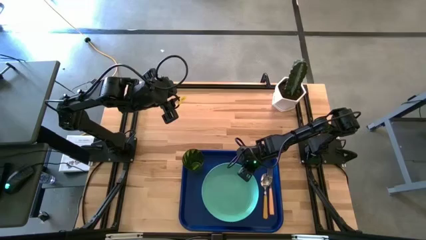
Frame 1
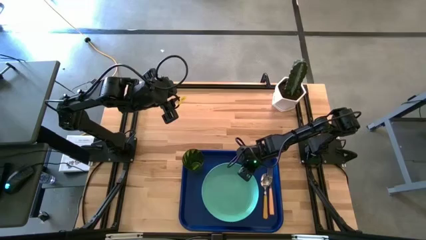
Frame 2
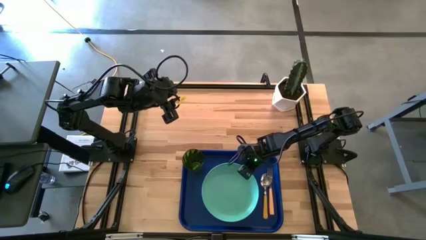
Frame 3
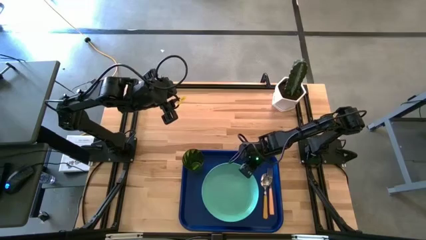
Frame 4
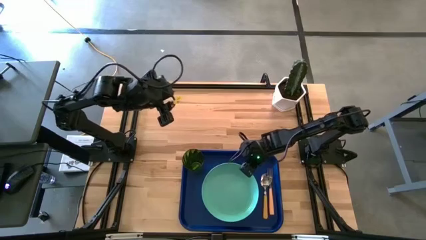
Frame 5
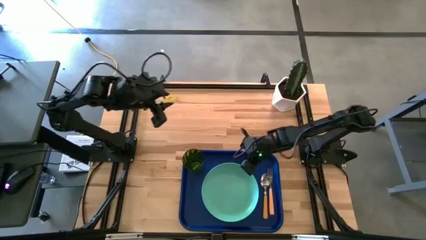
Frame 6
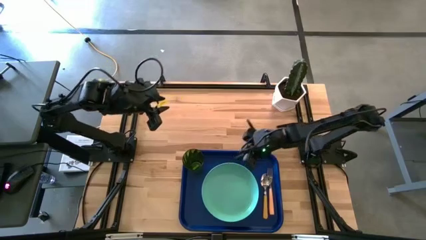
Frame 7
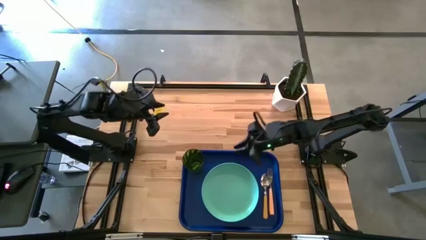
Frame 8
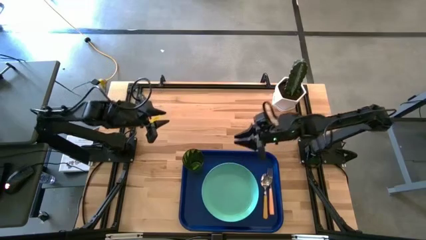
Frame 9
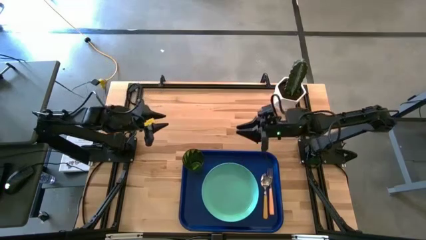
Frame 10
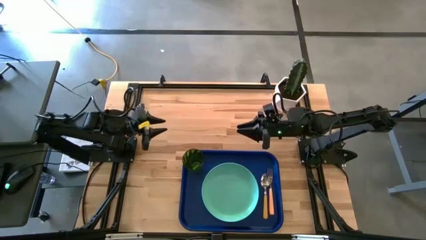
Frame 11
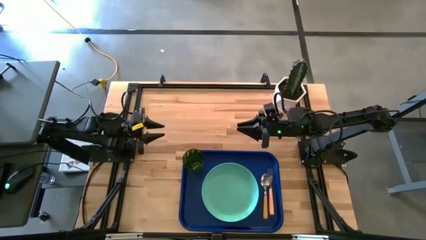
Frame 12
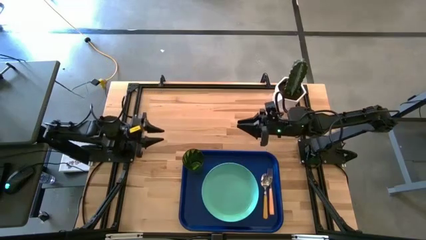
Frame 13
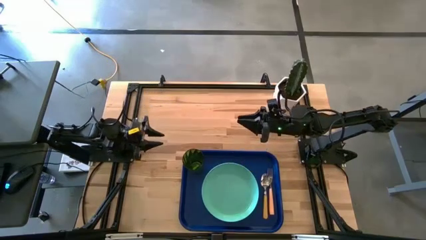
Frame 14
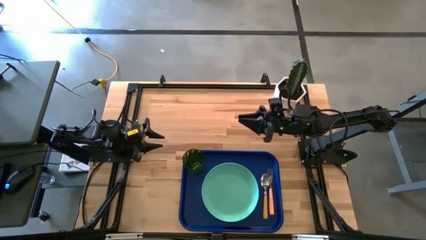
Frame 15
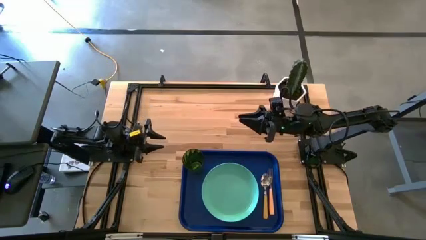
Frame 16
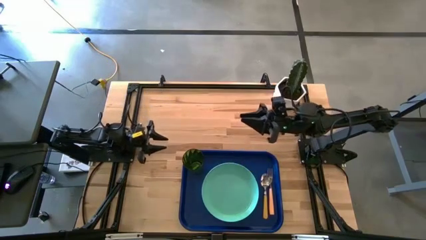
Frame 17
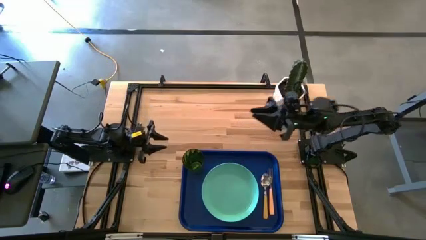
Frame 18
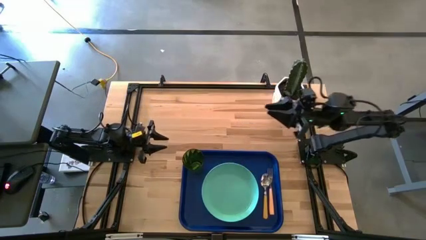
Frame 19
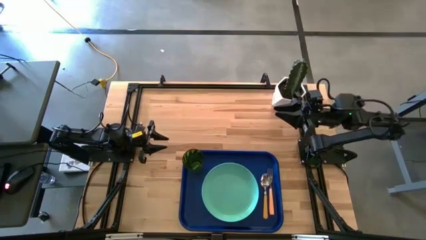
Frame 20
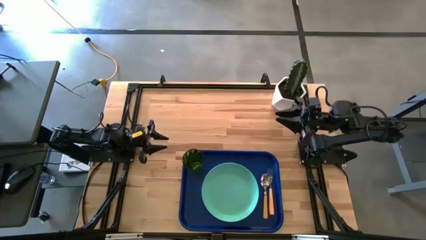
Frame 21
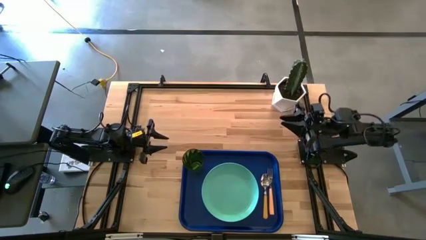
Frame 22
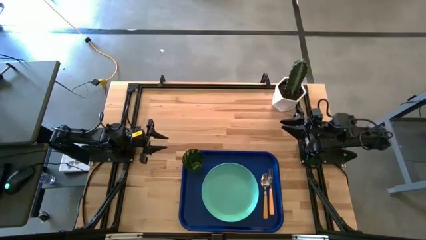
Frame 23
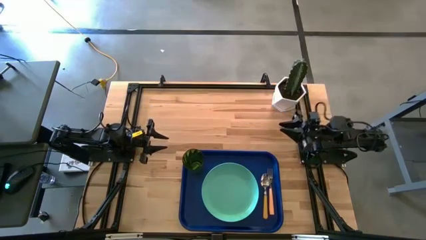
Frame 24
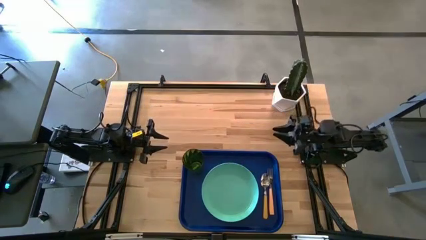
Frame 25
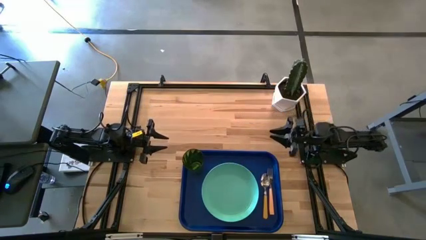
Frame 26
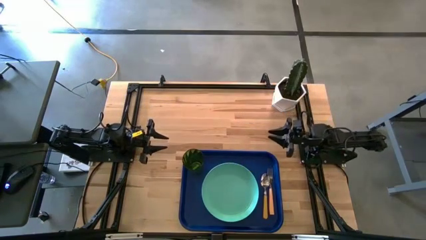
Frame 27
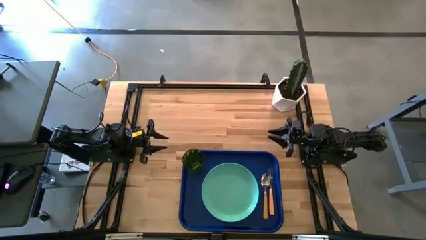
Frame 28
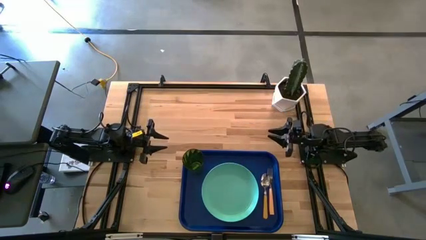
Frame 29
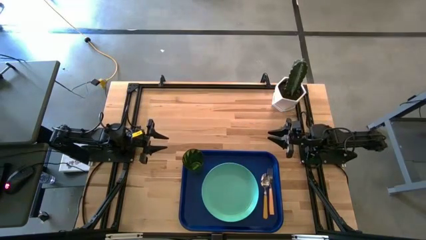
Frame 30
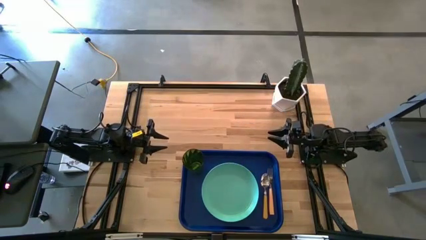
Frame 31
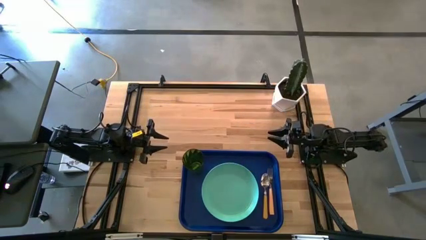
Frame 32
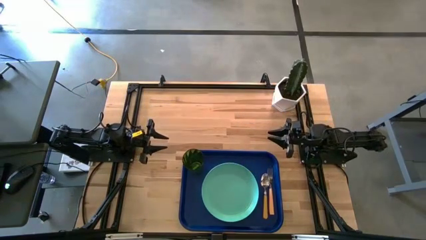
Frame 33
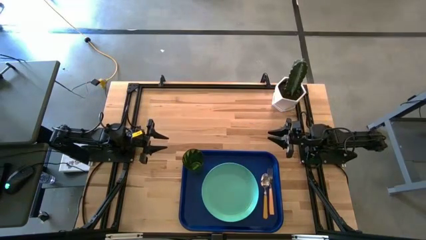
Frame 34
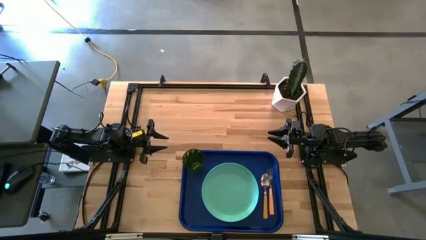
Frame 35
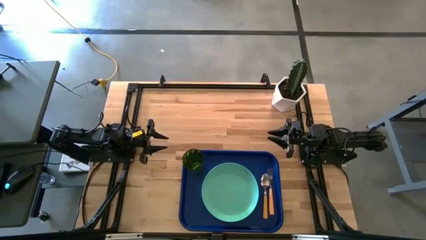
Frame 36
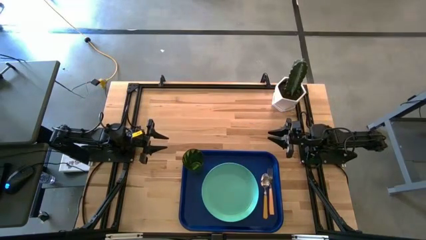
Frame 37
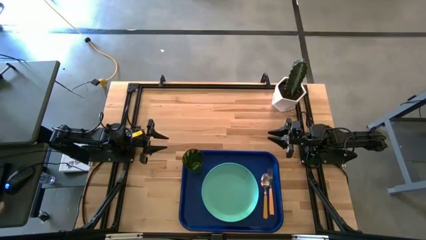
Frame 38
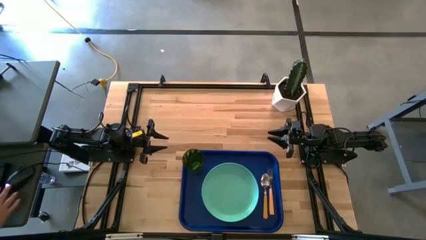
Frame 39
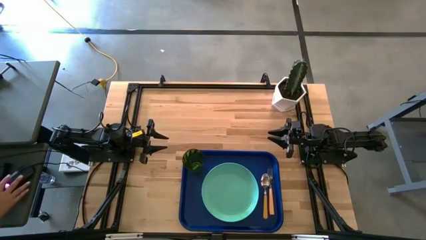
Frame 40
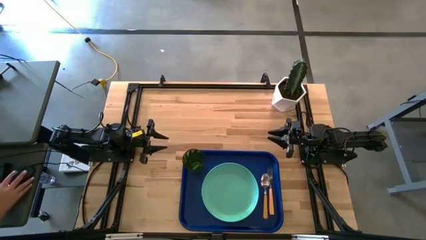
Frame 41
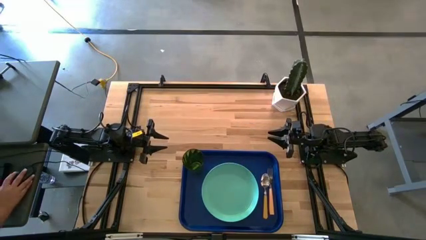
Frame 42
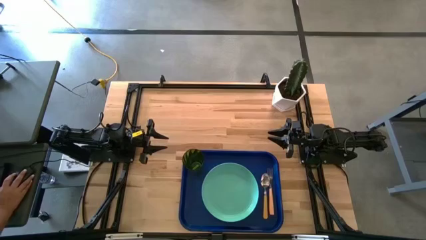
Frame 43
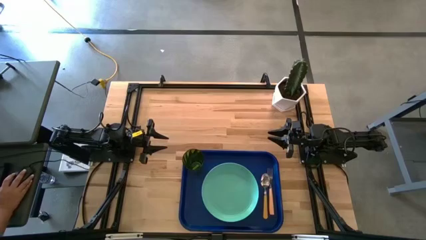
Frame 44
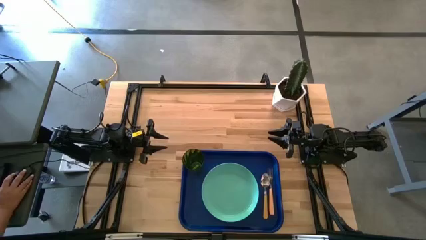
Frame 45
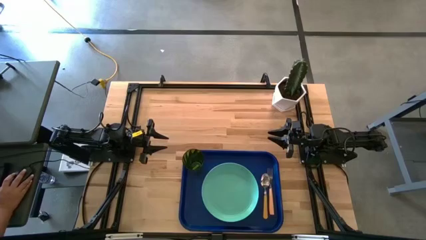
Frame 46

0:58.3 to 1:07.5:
Task: Pick and place plate/cup/fork/spoon on tray
Return to Home Position

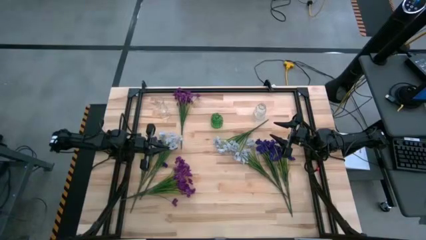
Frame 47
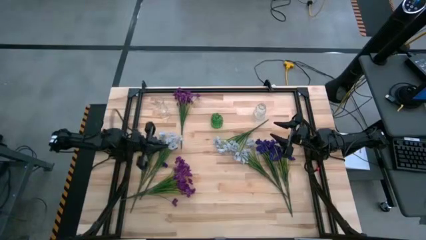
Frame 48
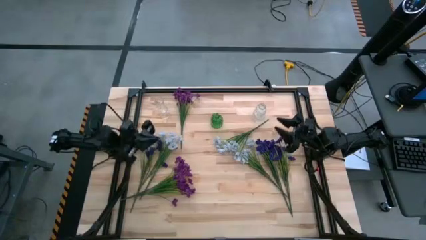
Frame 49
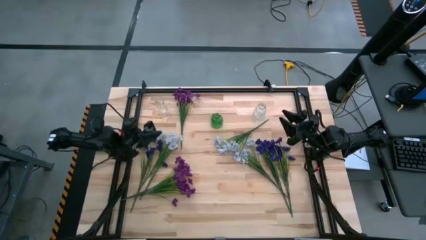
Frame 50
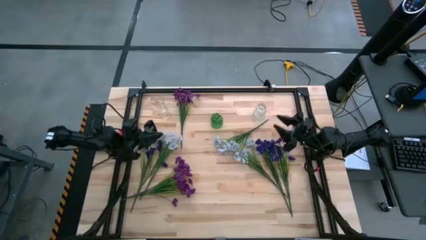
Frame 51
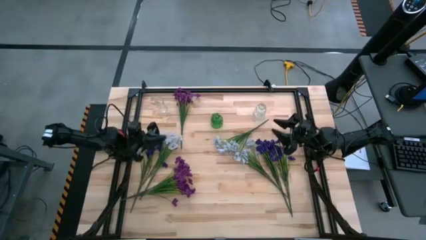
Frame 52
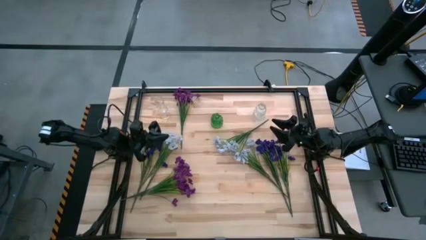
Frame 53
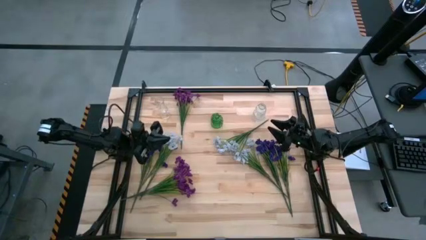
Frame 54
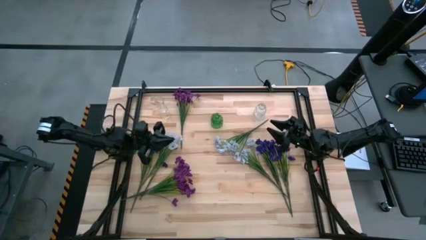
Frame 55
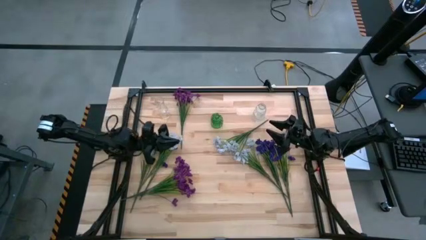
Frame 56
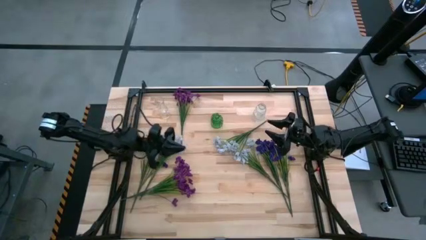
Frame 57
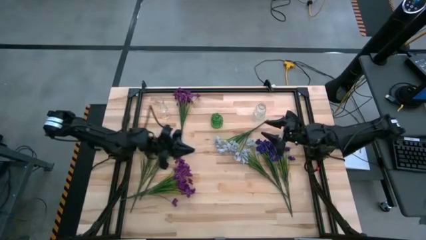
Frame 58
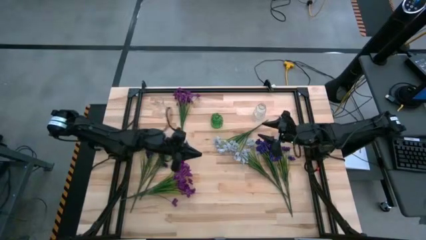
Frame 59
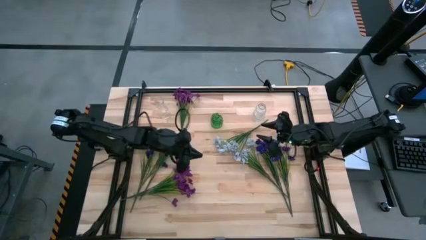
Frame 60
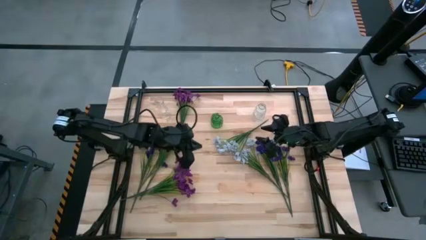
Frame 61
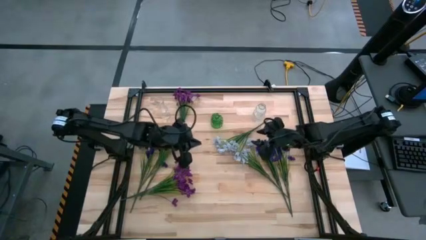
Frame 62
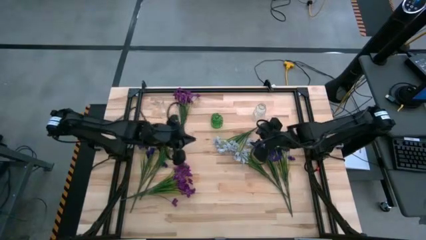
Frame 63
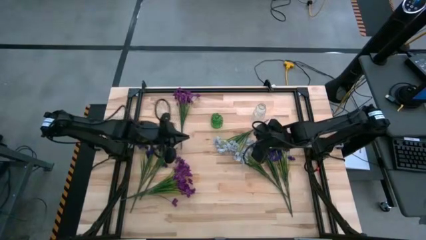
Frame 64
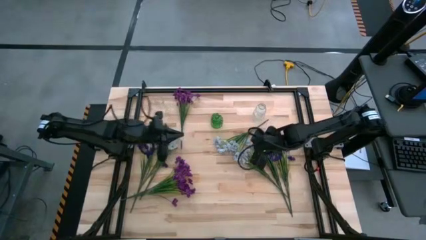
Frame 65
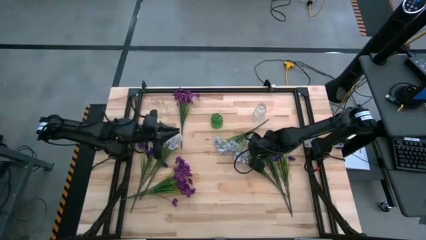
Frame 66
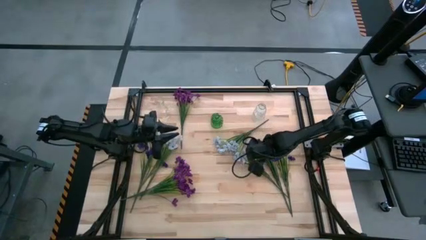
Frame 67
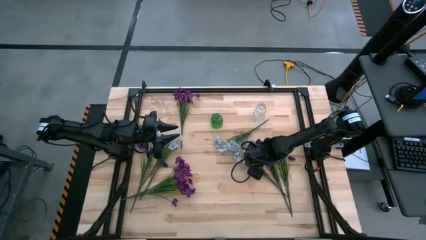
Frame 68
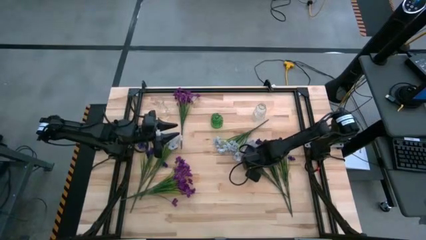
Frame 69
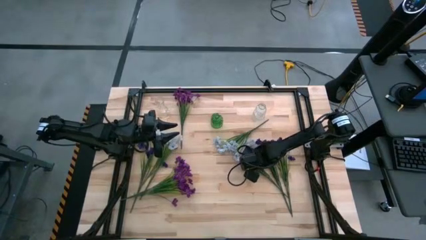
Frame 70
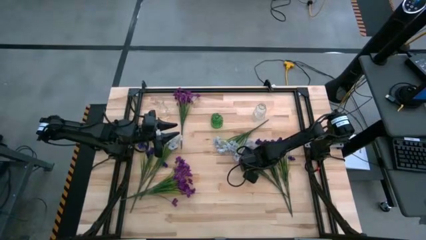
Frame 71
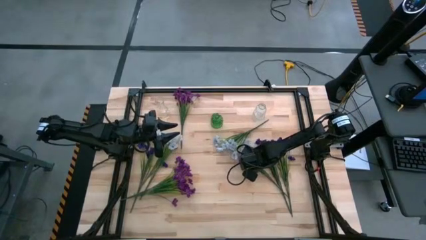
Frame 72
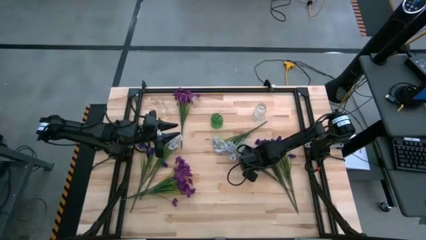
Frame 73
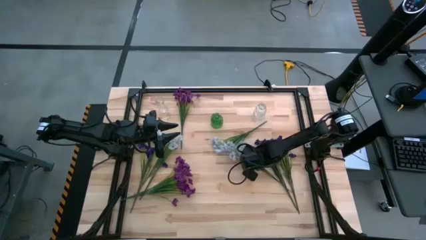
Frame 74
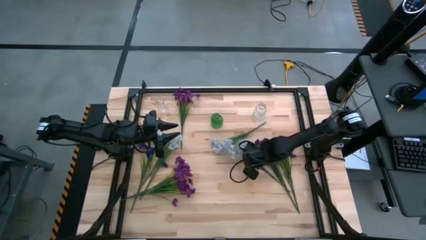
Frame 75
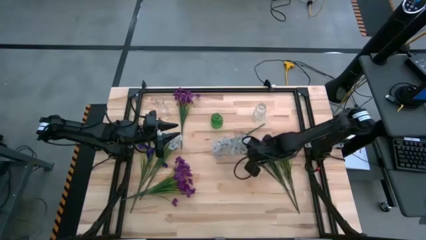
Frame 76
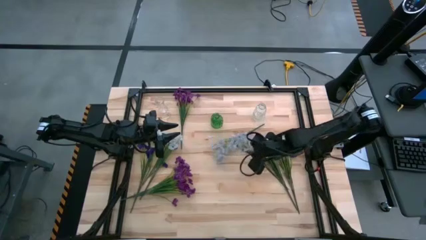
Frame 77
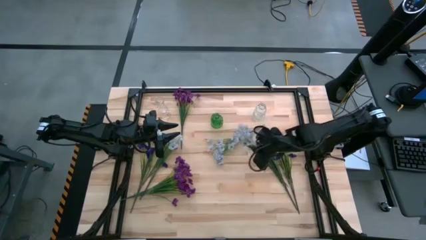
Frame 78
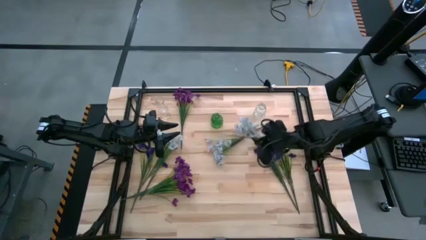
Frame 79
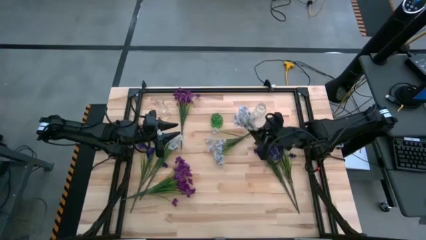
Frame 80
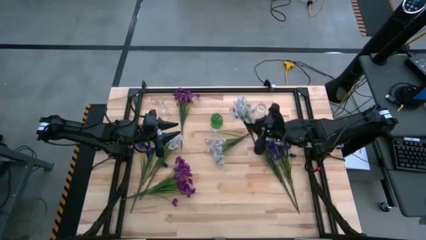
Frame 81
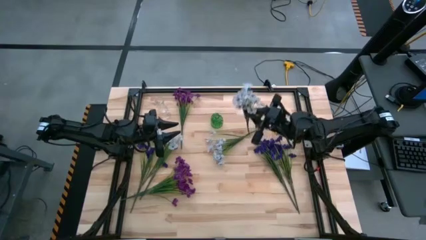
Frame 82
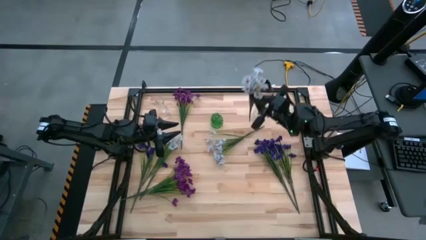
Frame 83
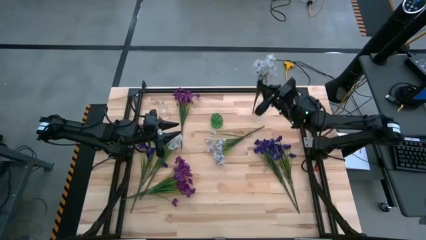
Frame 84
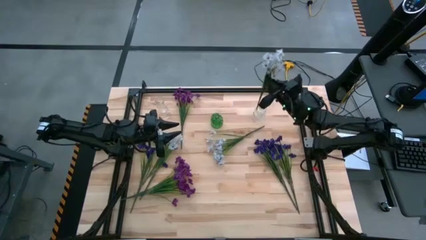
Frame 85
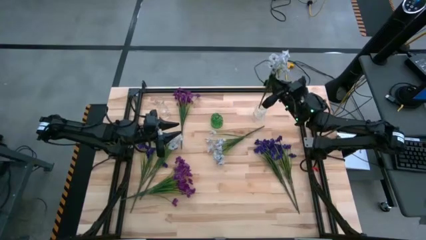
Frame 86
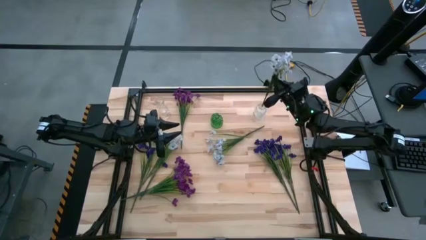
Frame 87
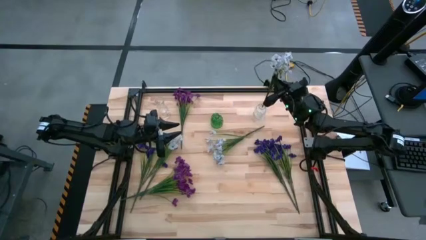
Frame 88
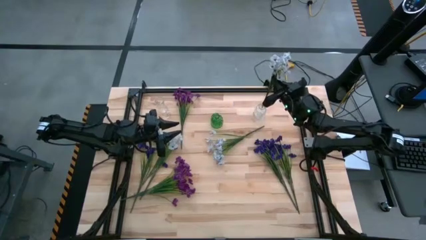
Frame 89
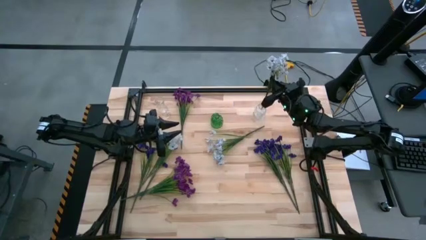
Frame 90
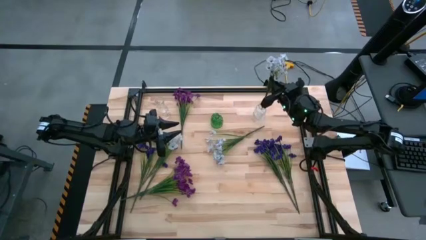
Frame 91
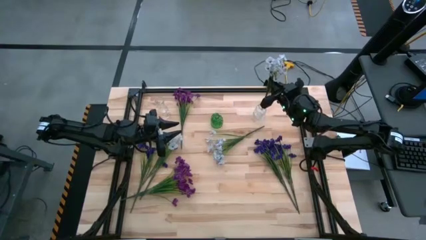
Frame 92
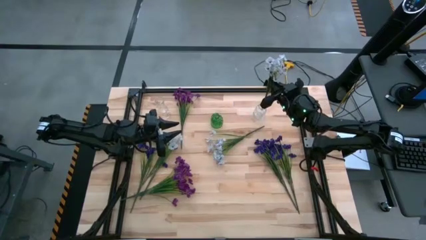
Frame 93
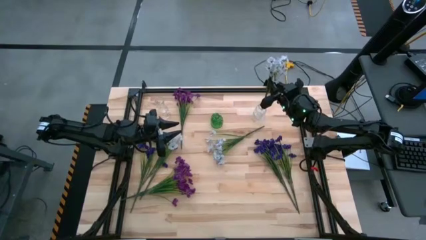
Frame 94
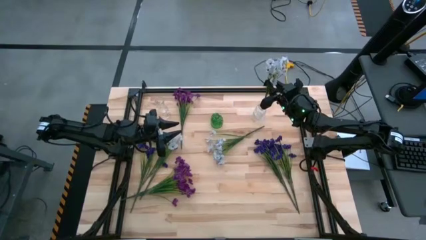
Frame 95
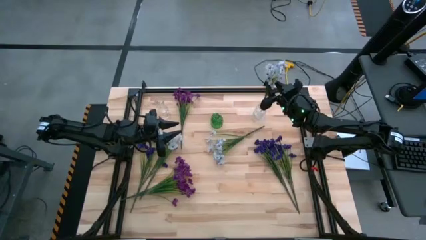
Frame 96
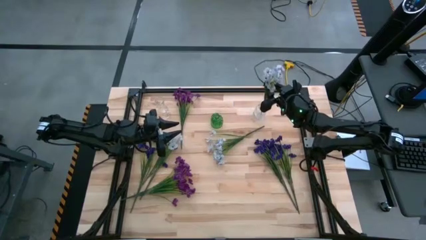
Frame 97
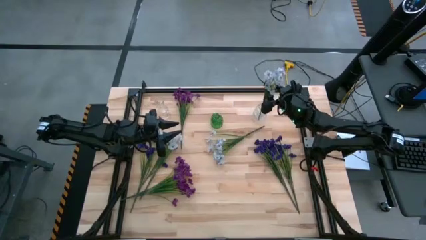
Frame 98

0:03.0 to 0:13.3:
Task: Sort flowers into vase by color
Put the bottom right white flowers into the right transparent flower vase
